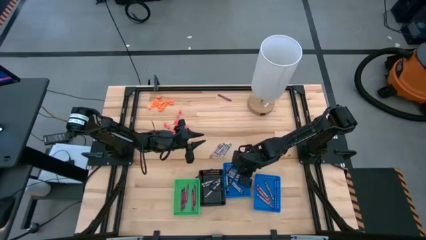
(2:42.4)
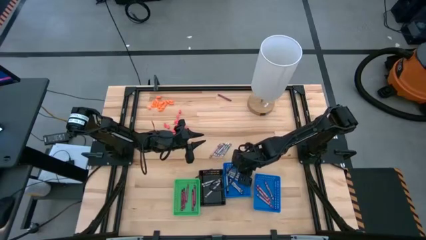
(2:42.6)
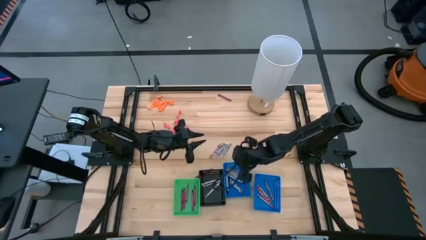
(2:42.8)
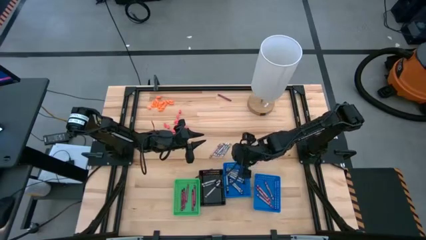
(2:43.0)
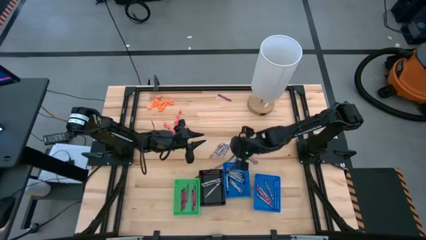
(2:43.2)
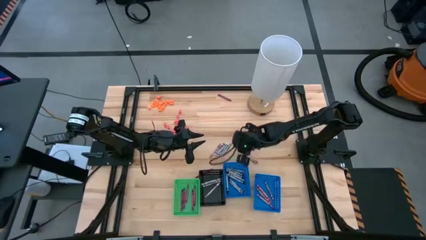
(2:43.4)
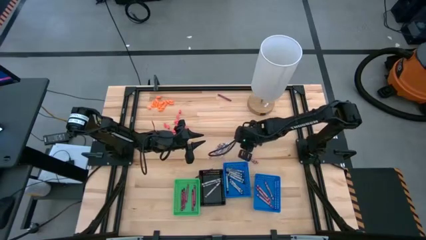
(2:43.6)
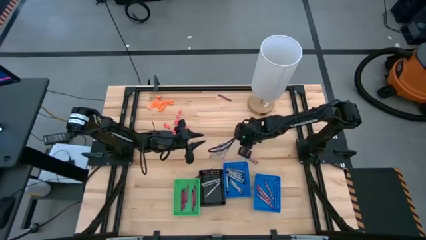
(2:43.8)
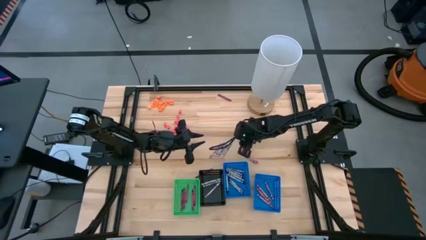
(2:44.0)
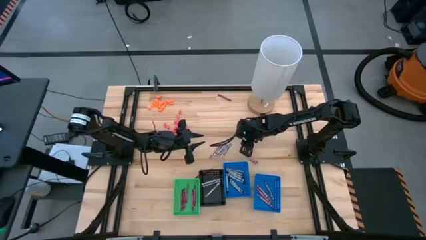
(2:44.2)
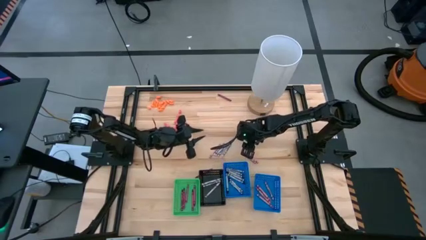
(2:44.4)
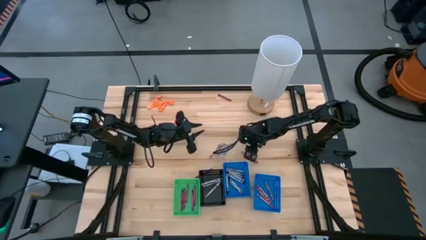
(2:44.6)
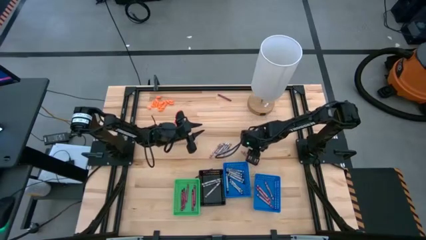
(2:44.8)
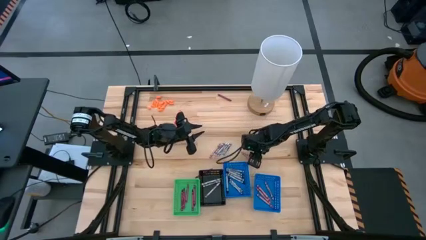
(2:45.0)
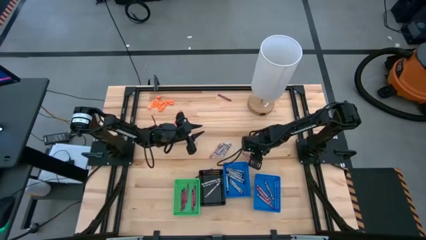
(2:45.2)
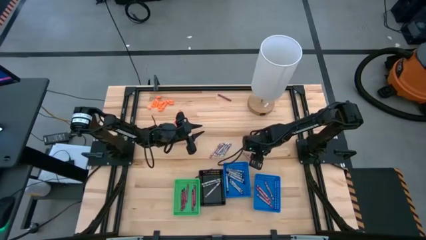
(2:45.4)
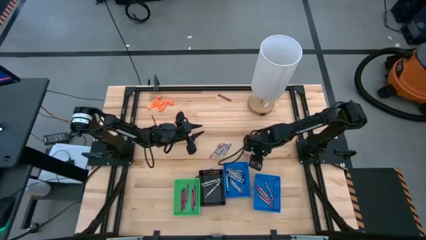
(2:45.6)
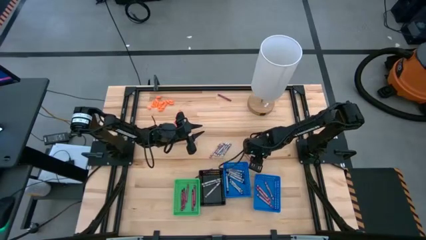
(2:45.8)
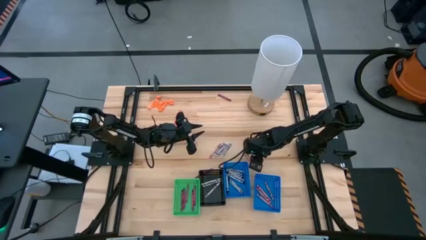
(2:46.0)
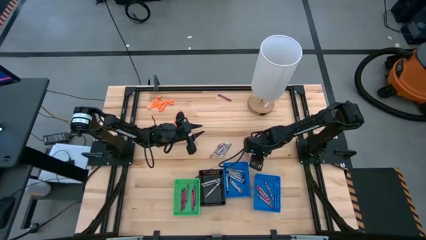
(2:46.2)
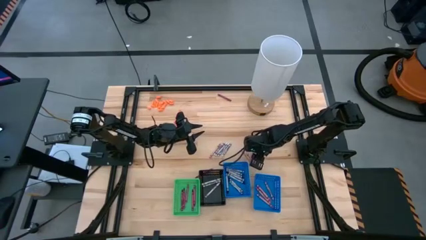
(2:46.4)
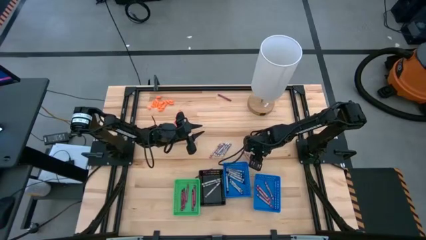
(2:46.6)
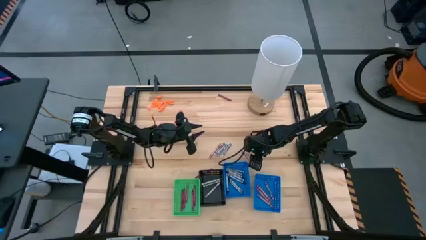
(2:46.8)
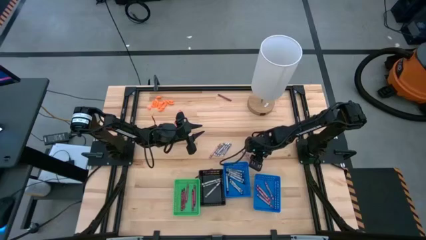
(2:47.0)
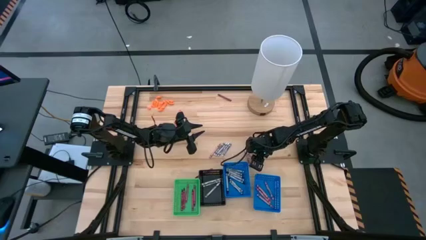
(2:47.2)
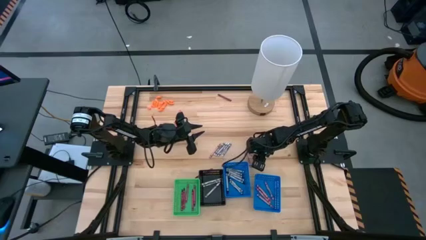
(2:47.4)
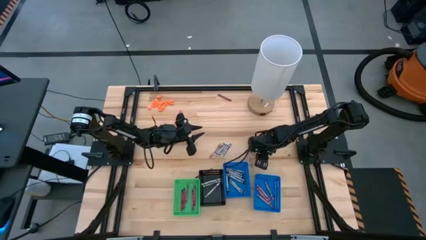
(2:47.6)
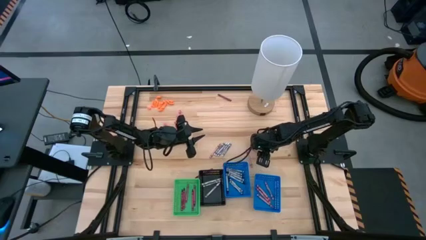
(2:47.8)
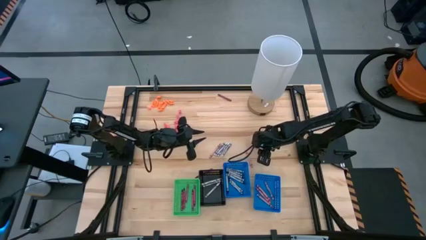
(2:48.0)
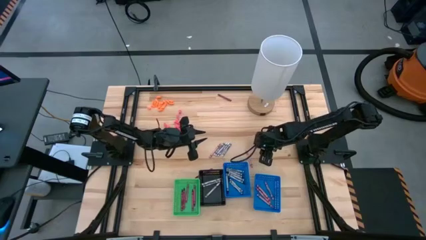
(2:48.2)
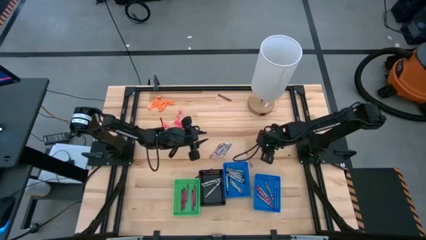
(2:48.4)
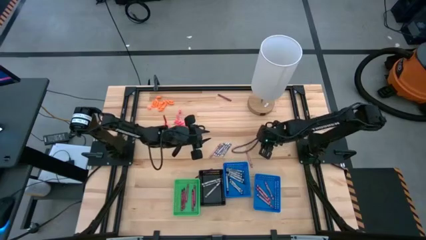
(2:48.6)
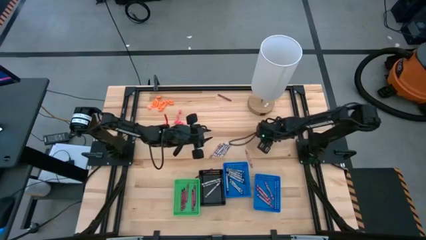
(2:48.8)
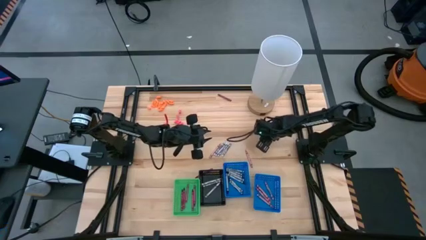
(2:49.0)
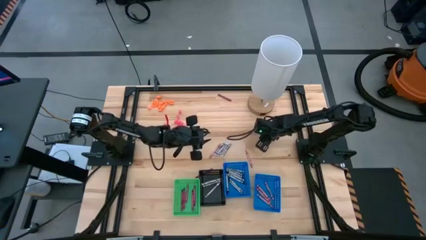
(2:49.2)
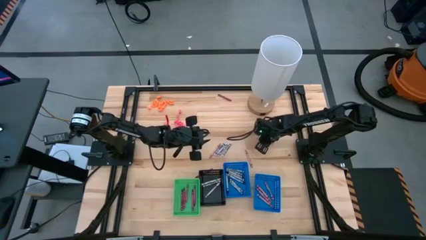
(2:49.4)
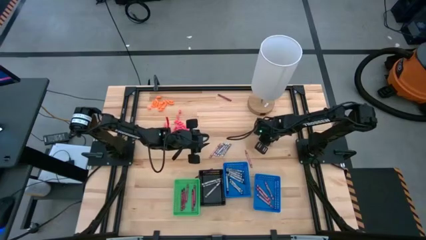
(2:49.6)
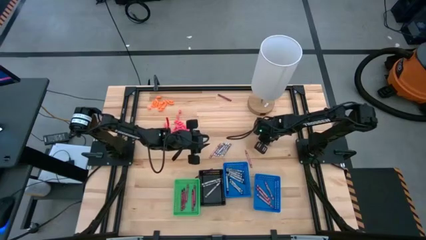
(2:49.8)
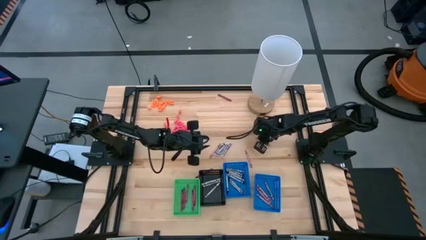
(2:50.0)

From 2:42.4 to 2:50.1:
Task: Sort crayons
Put the pink crayon into the right blue bin

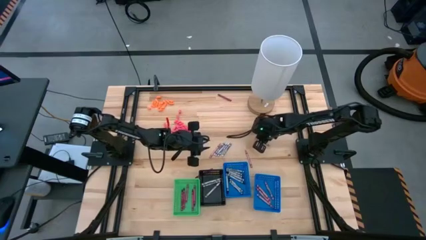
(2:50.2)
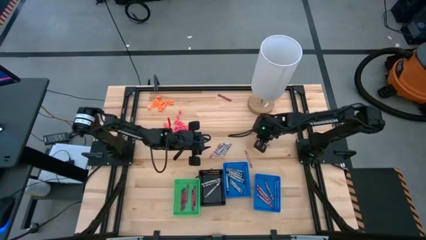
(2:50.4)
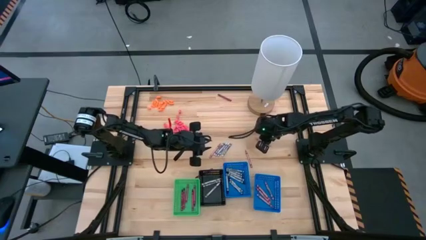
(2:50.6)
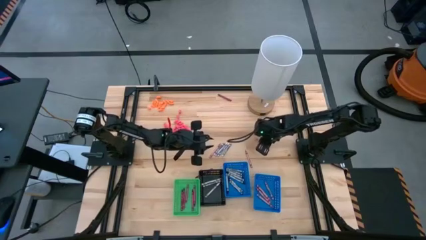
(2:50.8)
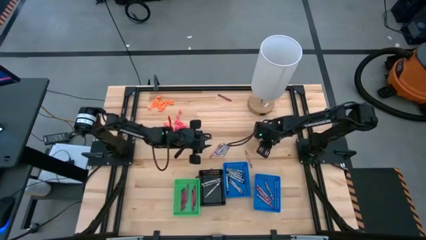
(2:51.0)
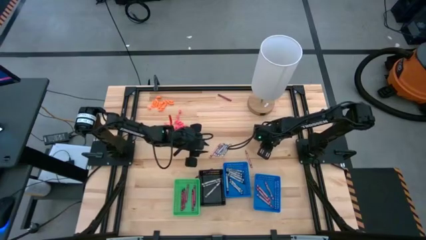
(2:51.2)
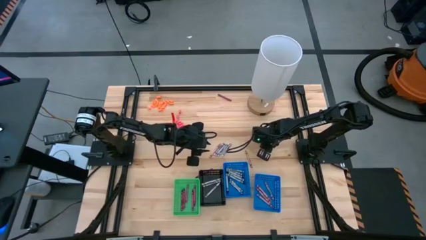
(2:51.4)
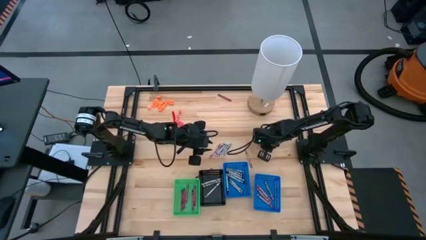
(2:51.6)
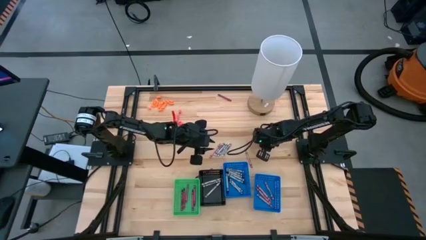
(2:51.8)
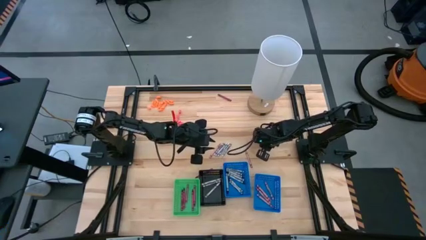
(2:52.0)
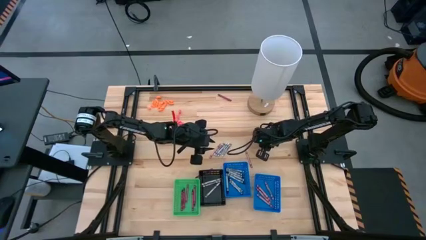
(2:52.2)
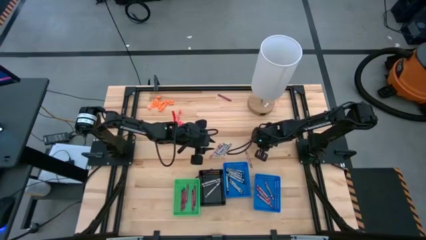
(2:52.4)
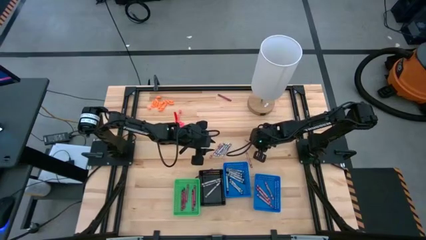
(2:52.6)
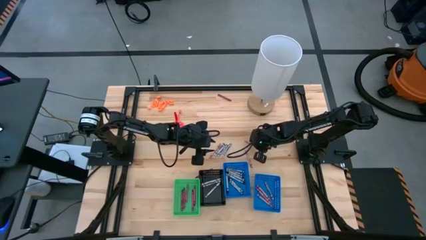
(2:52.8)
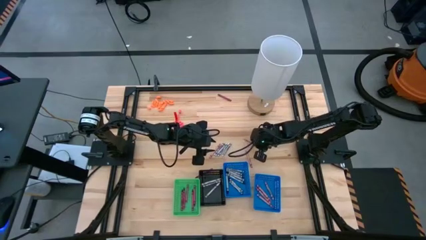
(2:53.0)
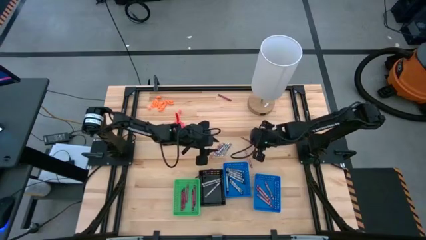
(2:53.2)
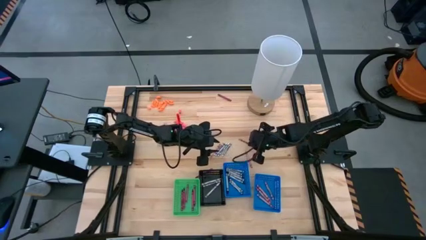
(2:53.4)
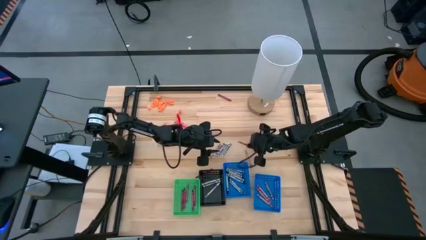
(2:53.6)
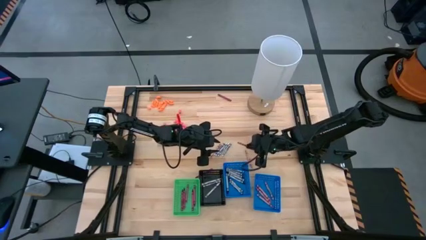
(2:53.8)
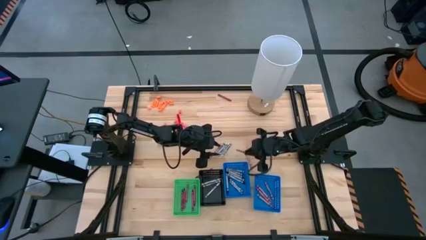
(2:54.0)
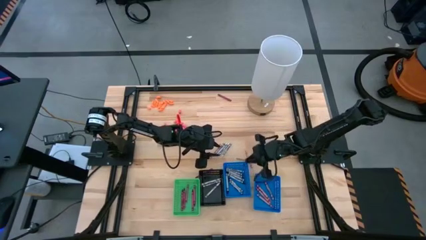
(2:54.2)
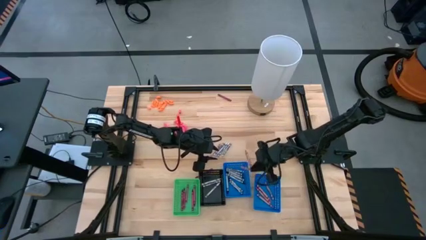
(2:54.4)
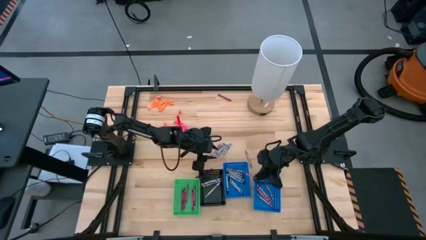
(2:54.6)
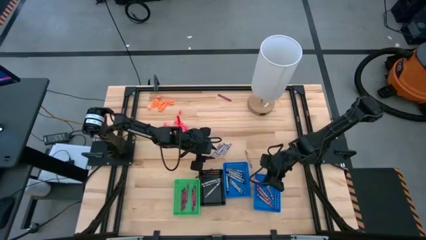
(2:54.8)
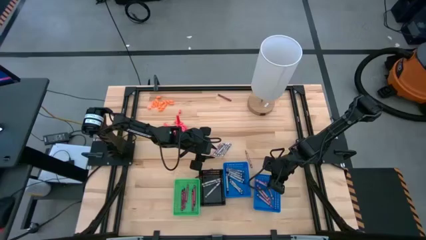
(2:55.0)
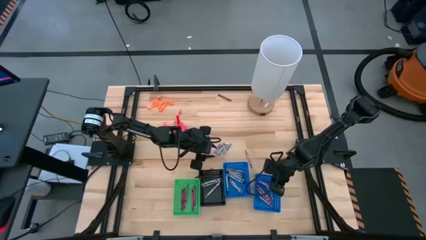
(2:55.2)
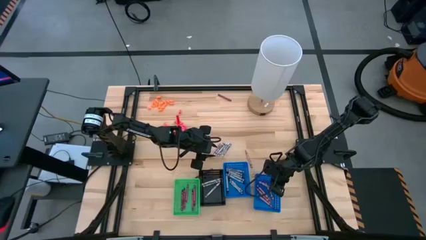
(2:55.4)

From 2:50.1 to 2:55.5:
Put the pink crayon into the right blue bin

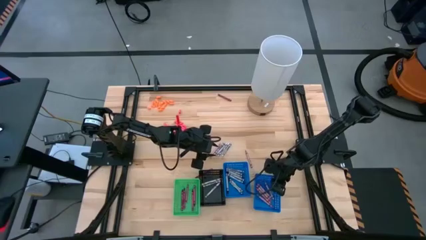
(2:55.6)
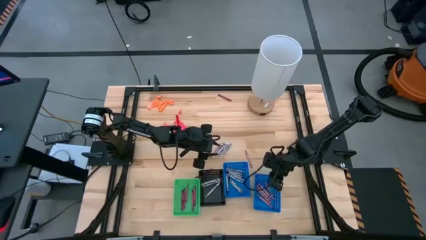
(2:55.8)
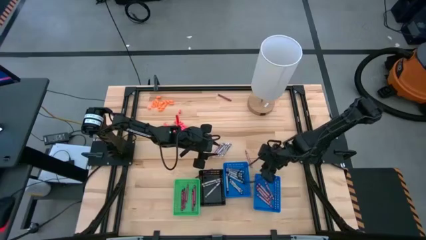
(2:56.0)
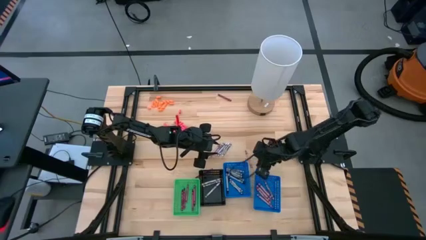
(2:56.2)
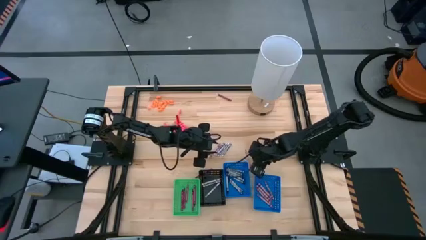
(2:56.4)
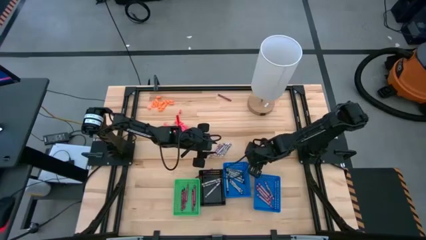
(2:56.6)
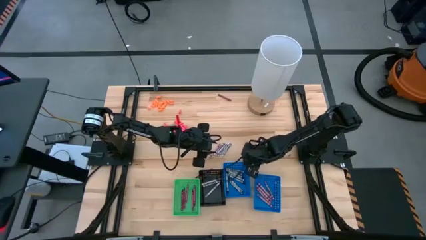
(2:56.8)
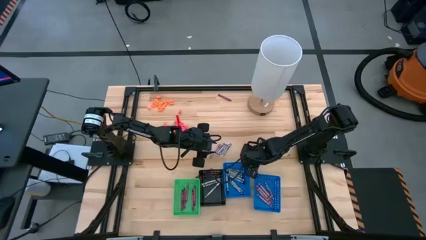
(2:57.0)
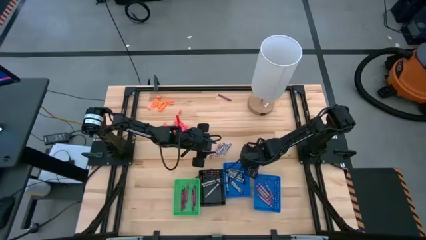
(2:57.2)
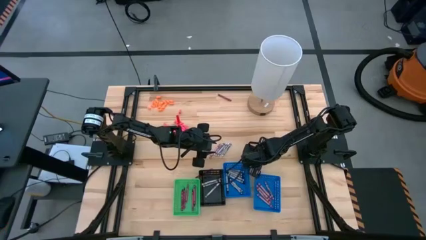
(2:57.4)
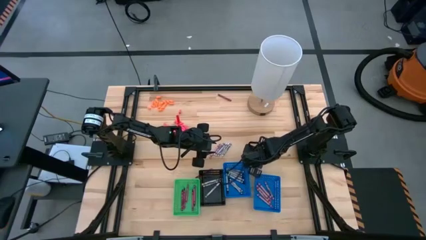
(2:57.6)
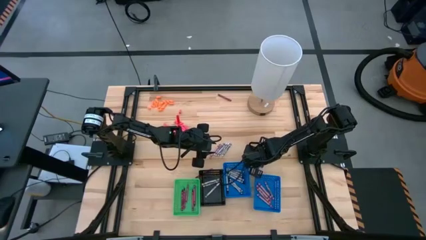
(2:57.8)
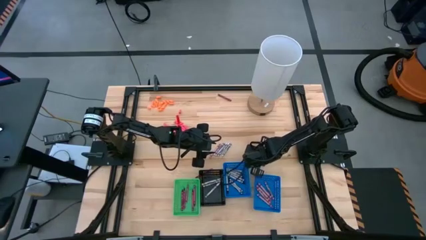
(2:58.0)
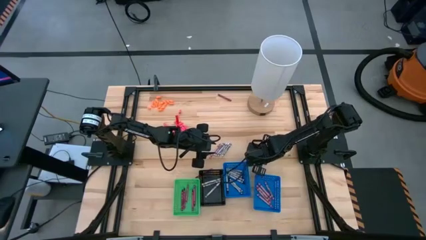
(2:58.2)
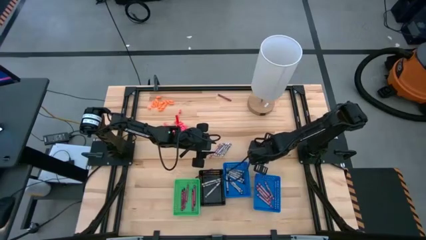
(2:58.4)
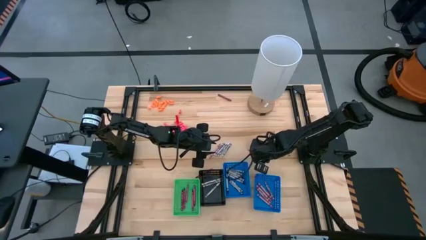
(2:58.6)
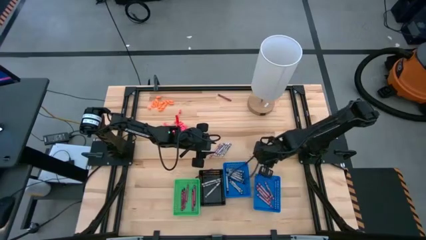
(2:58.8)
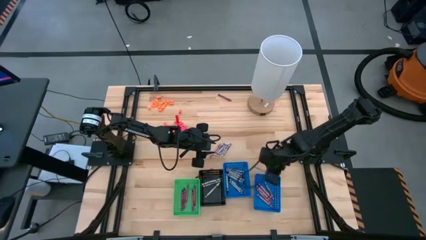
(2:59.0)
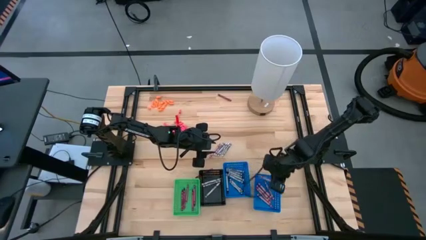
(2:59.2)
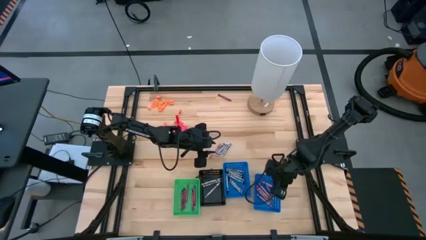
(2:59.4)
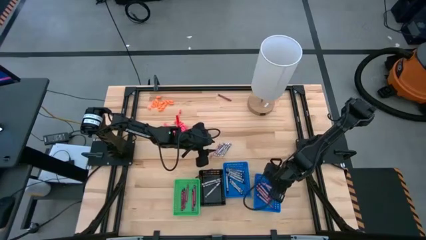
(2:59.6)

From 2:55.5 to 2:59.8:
Put the pink crayon into the right blue bin
